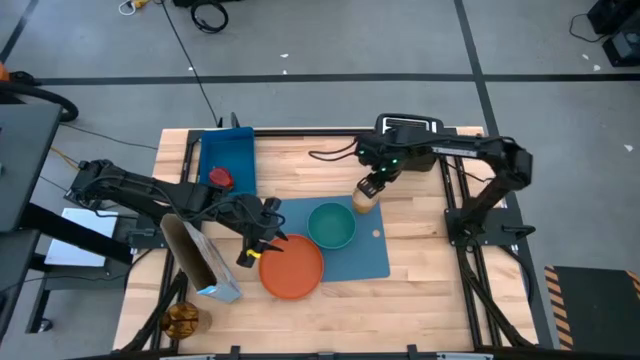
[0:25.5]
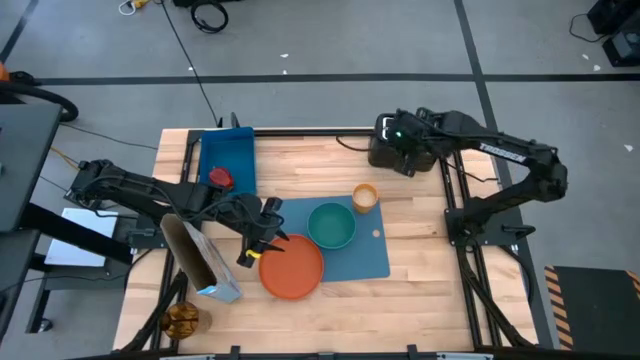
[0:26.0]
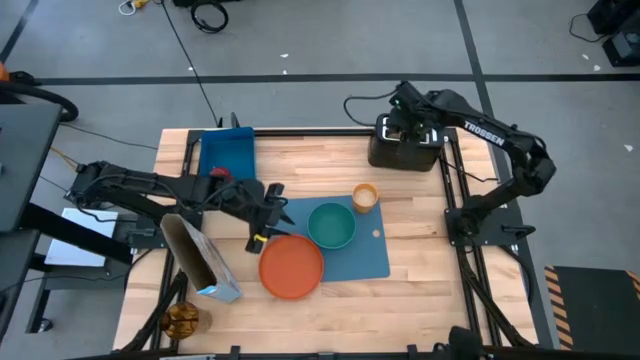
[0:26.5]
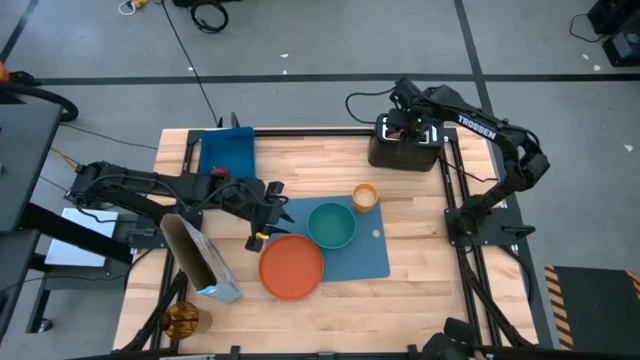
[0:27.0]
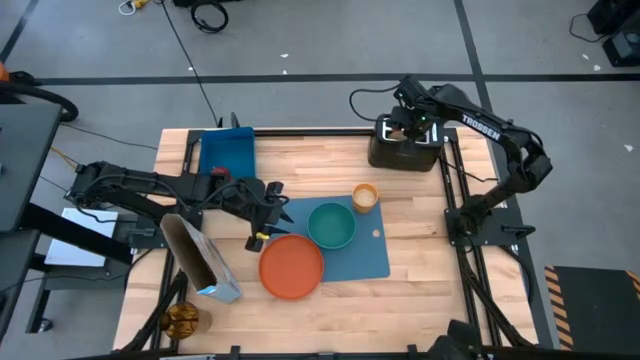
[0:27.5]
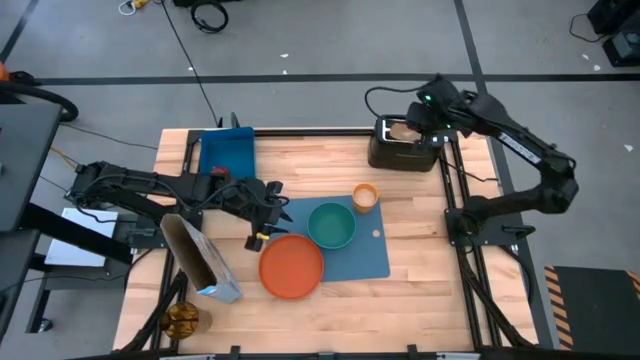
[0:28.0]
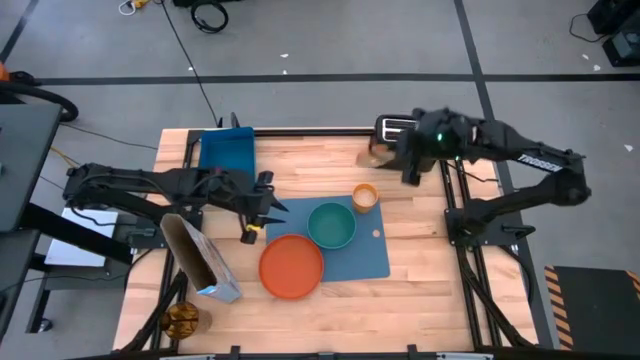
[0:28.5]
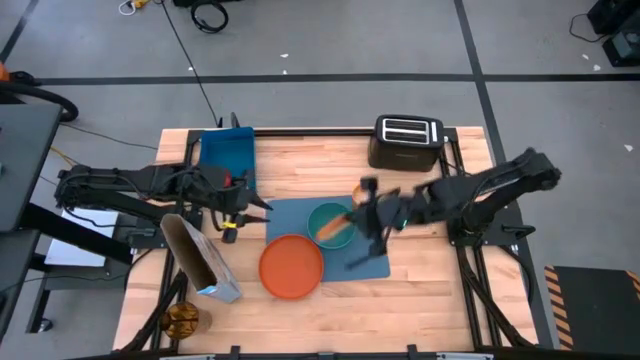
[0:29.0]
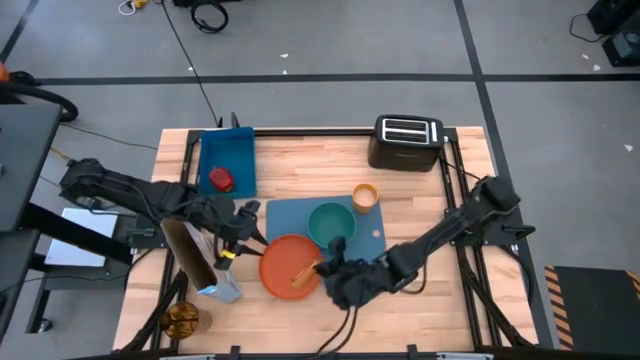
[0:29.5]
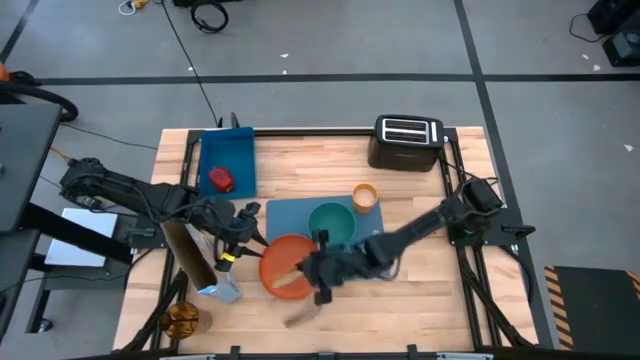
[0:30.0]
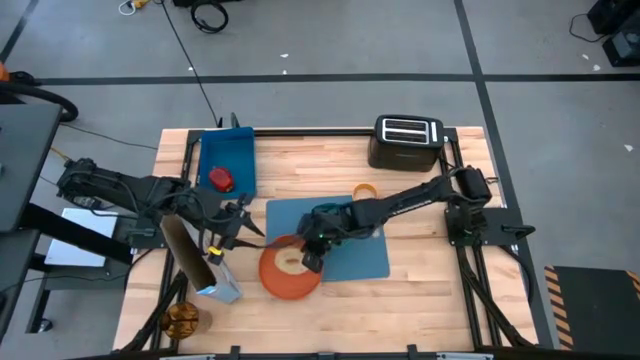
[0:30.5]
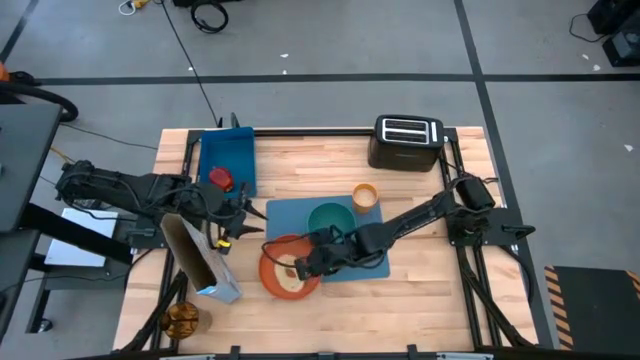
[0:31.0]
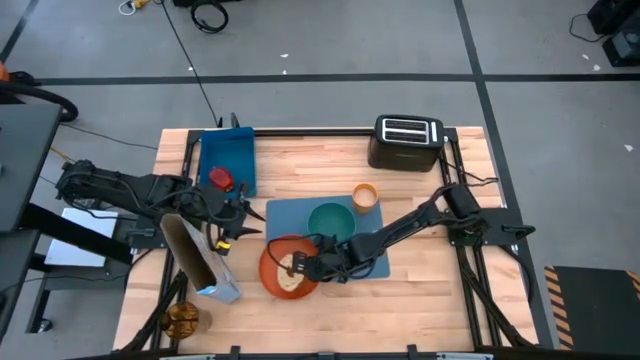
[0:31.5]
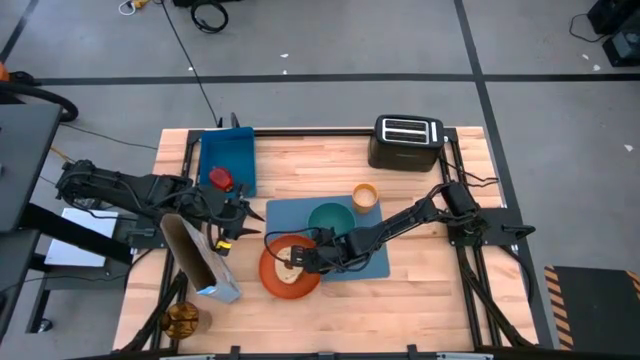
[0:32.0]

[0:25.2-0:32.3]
Task: Arrange a breakfast setting
Put the toasted bread on the orange plate

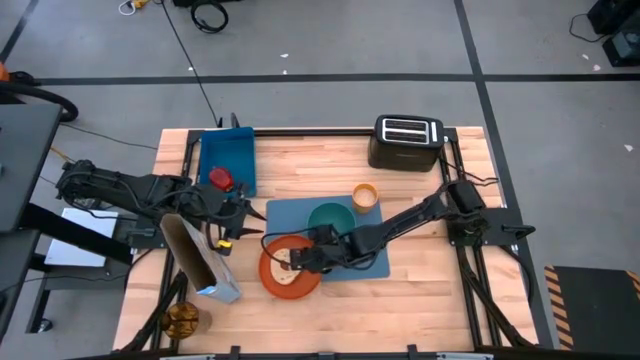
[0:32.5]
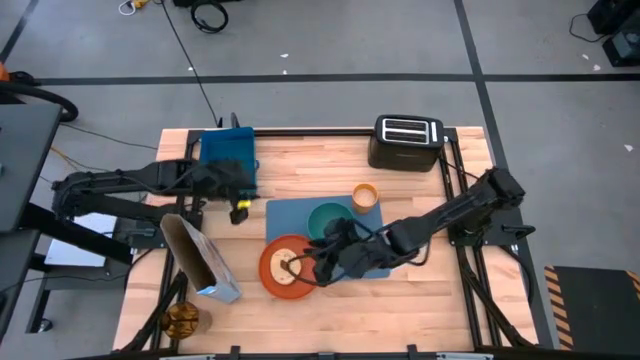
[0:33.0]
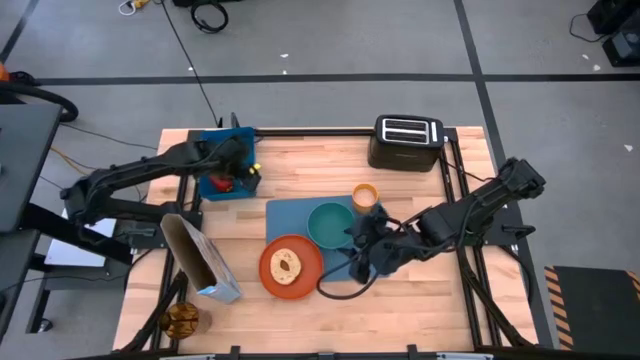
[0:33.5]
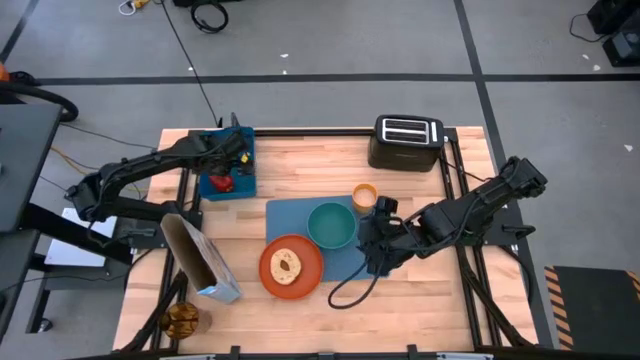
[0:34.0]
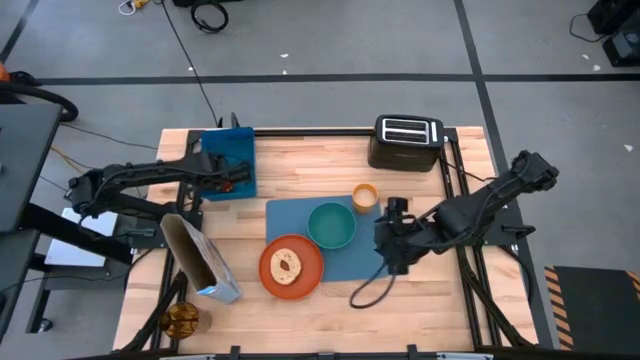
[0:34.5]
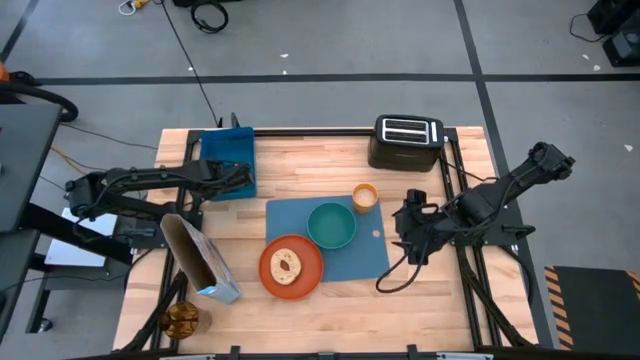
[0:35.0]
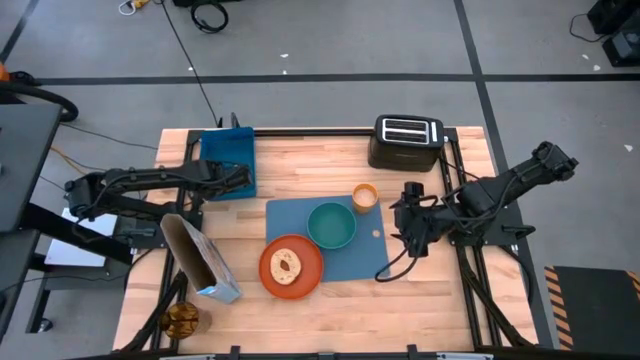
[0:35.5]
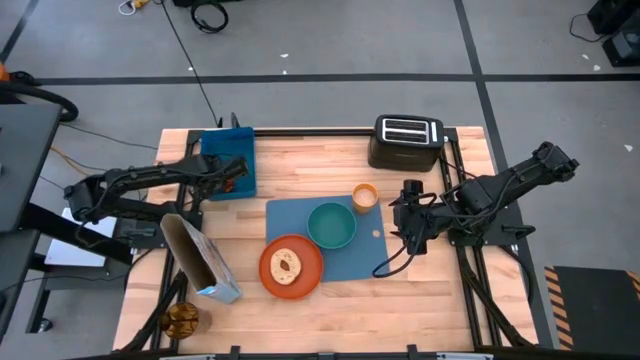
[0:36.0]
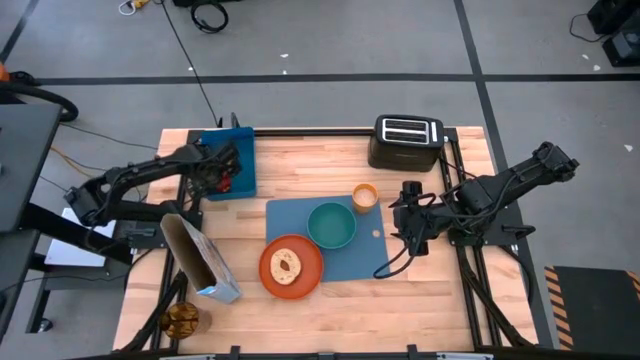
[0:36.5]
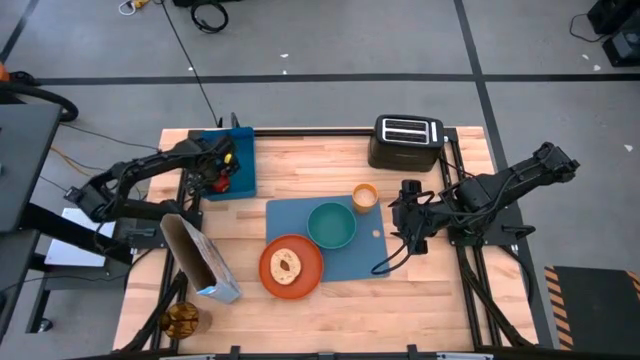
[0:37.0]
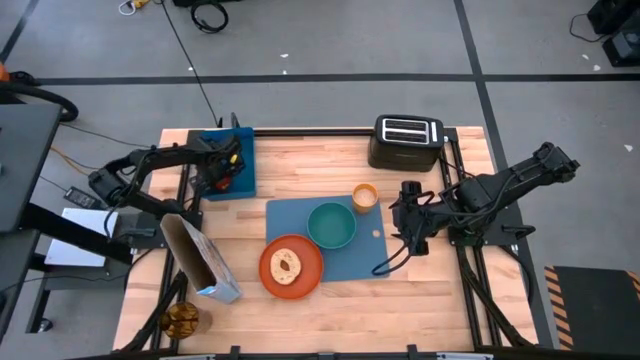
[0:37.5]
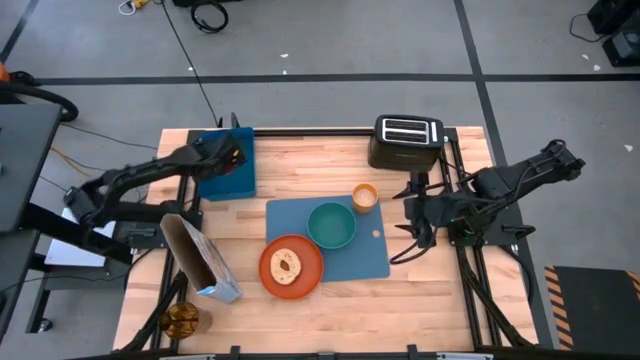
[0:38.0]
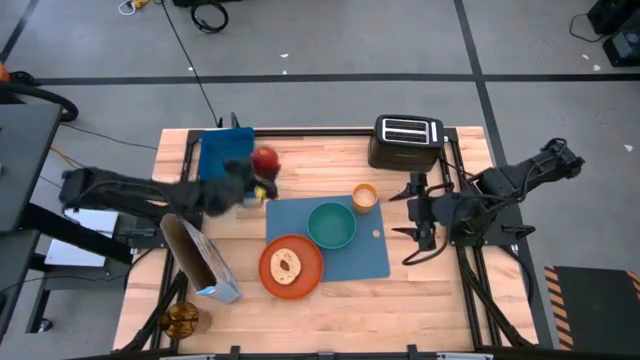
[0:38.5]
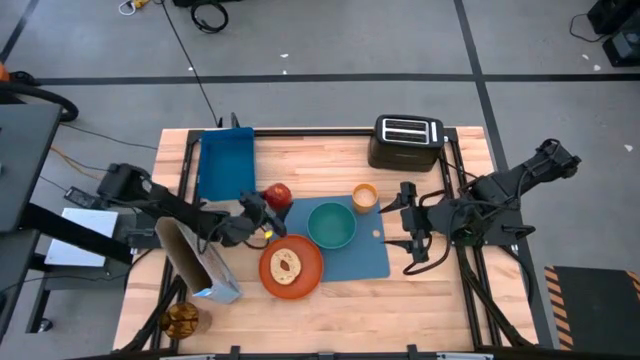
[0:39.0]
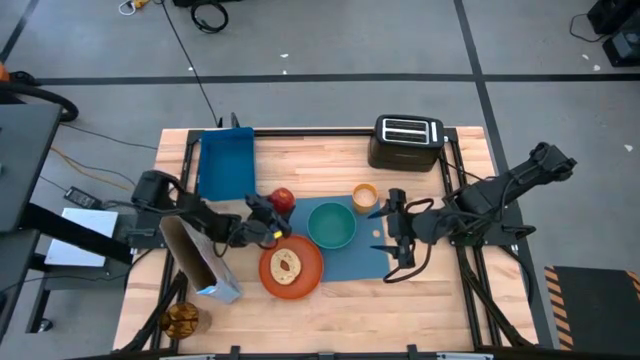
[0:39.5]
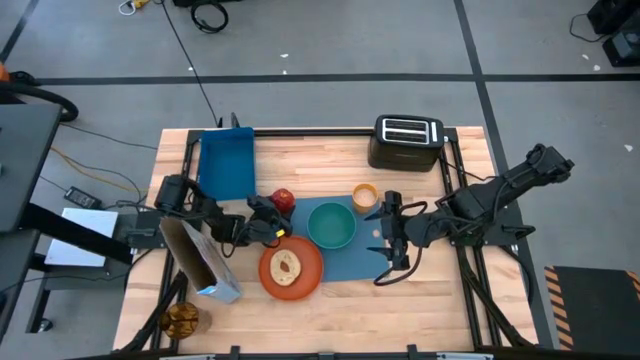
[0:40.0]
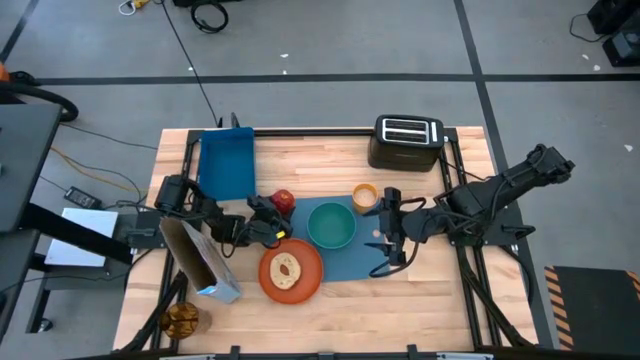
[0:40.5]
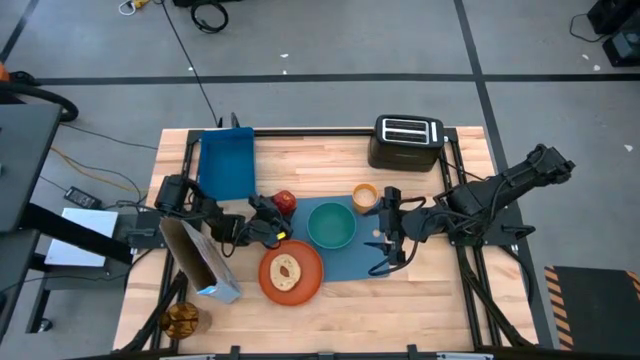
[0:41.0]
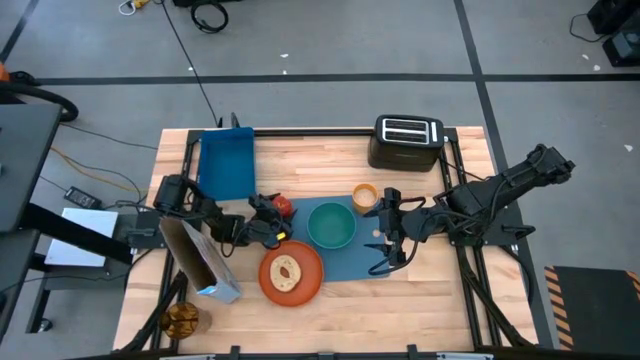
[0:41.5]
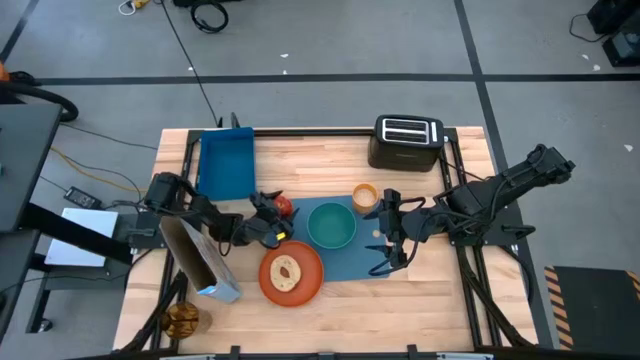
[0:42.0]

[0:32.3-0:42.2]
Put the red apple on the blue table mat to the top left of the green bowl

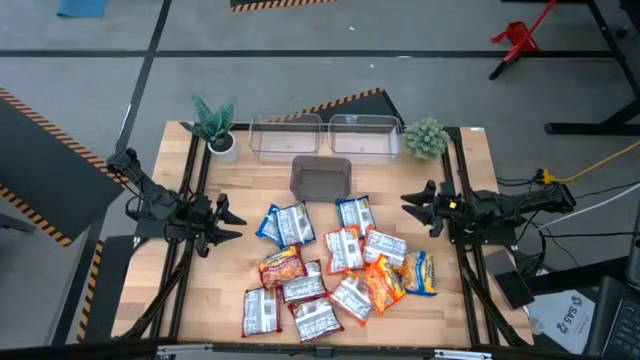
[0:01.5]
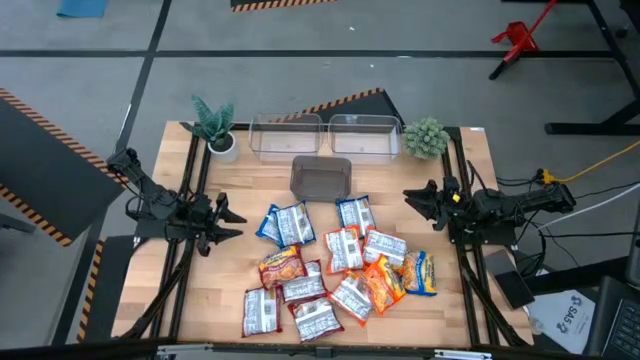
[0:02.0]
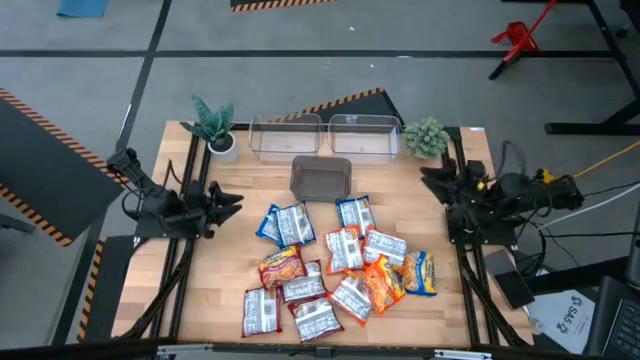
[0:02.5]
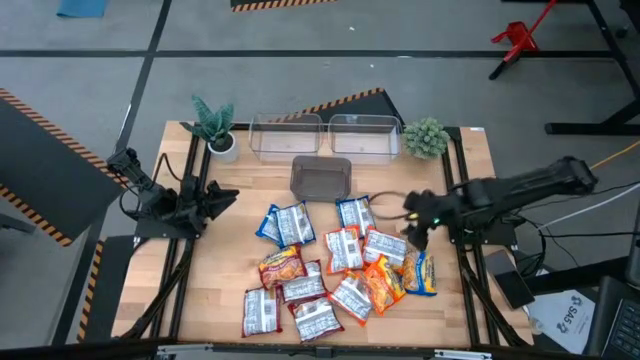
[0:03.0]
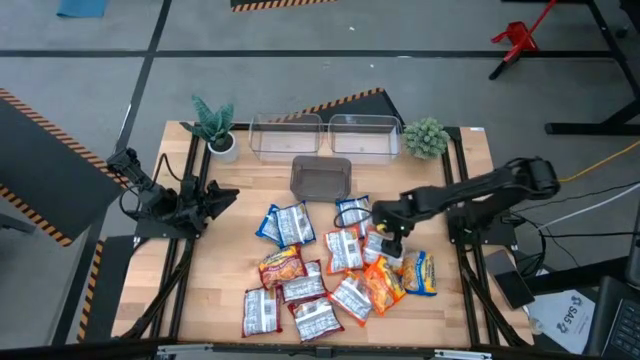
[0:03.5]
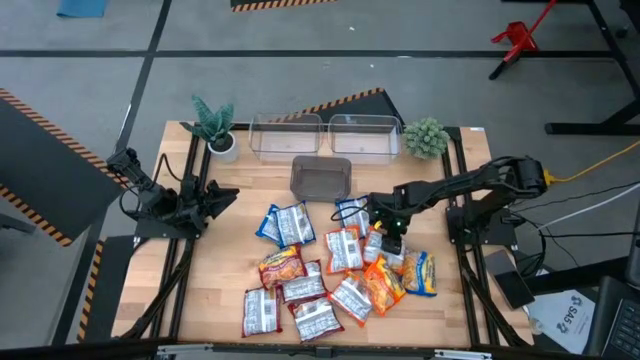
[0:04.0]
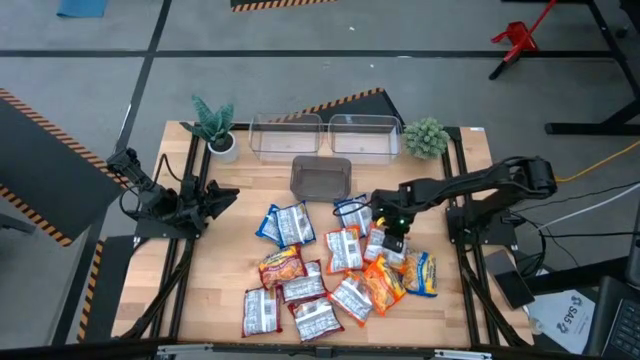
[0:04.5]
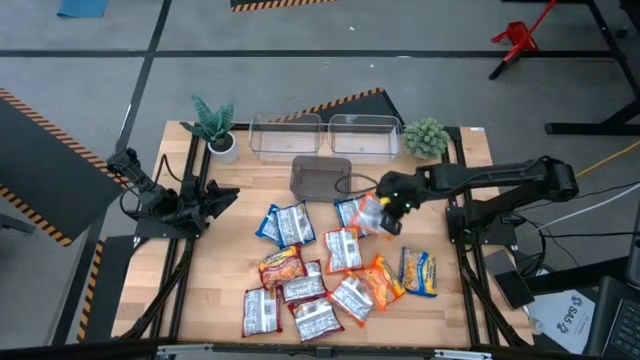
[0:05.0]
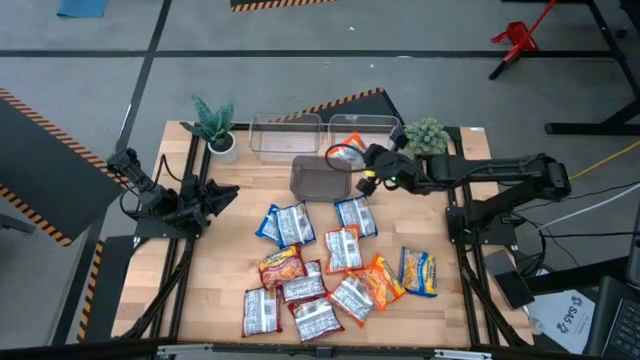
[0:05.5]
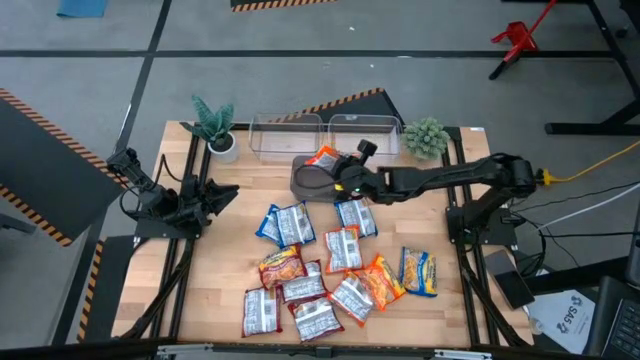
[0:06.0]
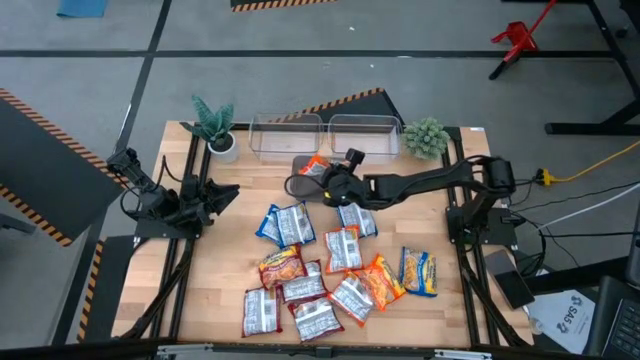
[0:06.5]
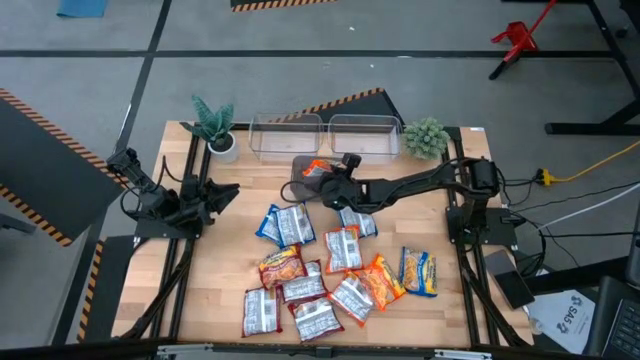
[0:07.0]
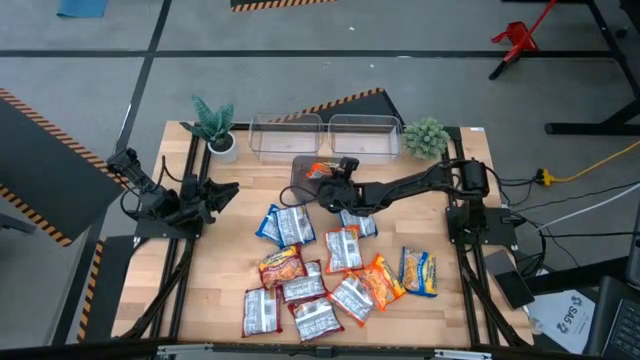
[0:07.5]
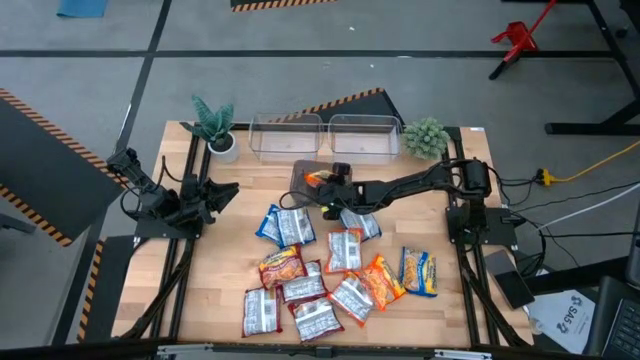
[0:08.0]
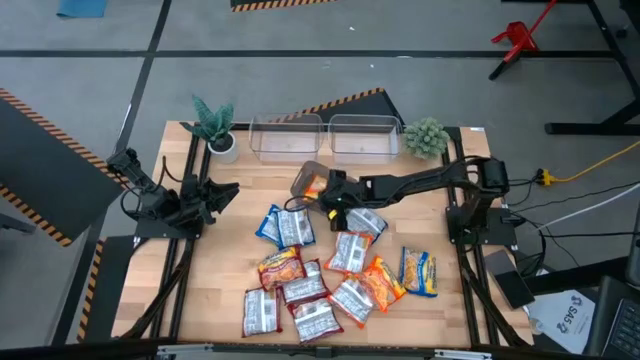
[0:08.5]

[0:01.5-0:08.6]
Task: Sort Maruchan noodles
Put the orange noodle pack into the black bin
